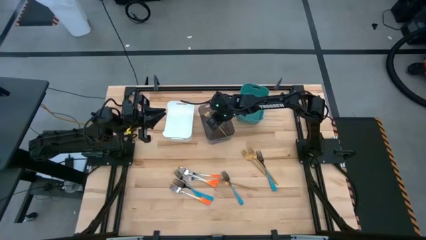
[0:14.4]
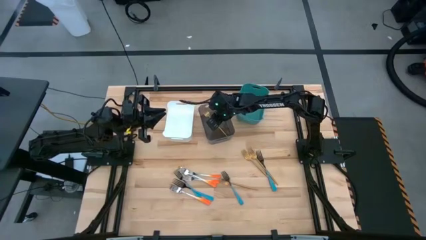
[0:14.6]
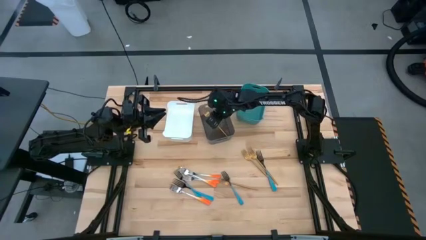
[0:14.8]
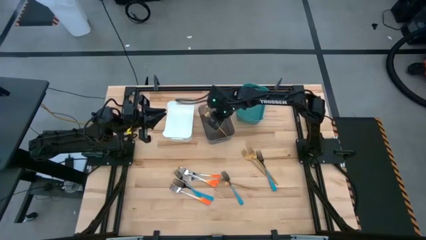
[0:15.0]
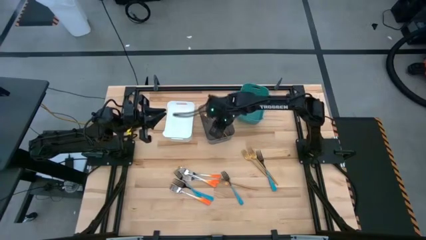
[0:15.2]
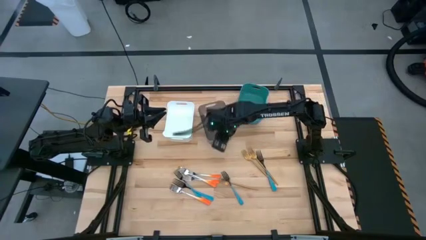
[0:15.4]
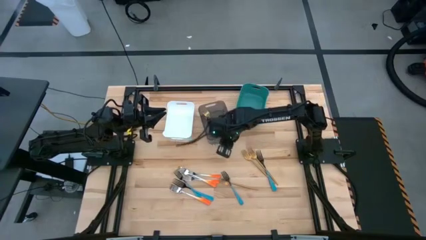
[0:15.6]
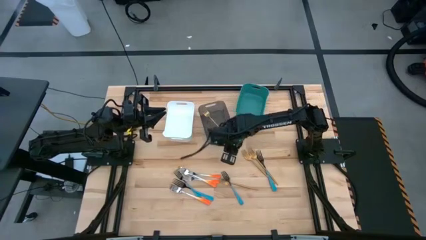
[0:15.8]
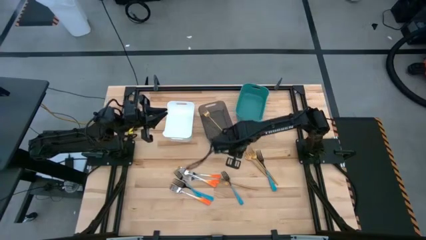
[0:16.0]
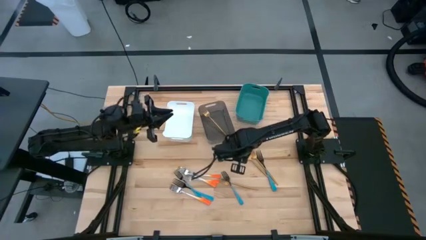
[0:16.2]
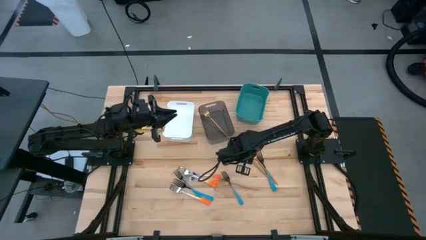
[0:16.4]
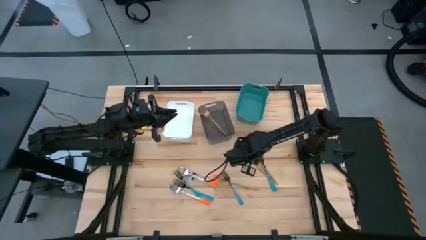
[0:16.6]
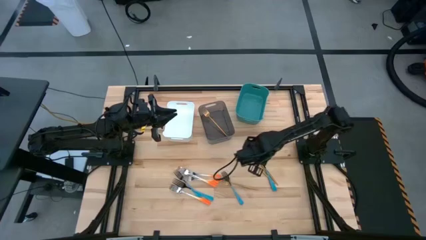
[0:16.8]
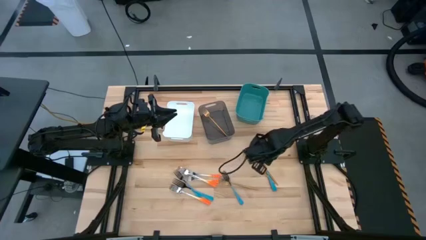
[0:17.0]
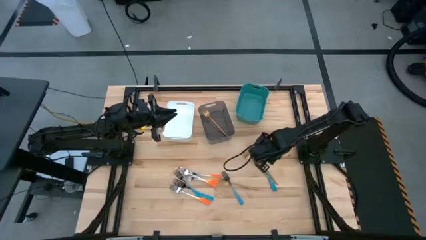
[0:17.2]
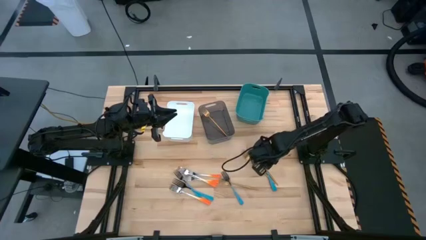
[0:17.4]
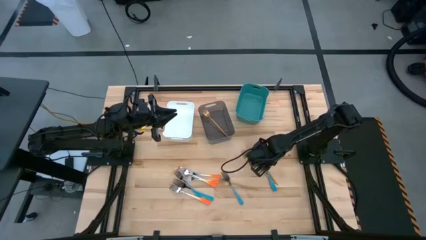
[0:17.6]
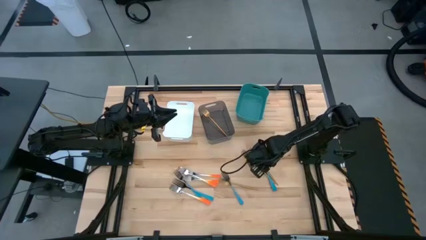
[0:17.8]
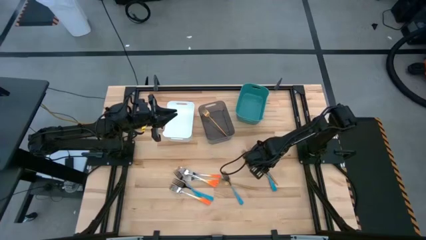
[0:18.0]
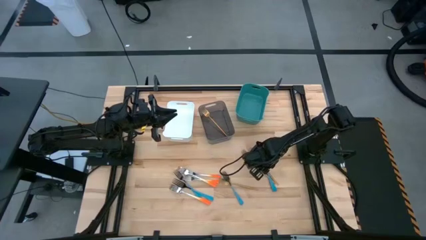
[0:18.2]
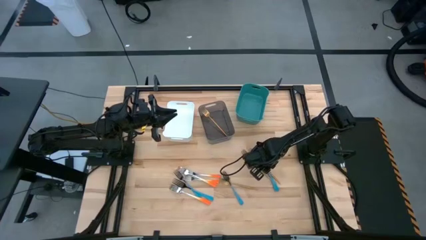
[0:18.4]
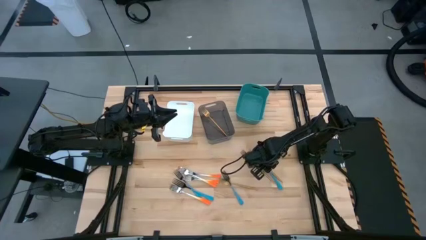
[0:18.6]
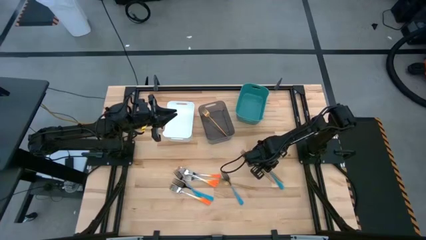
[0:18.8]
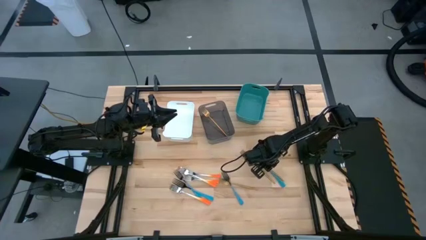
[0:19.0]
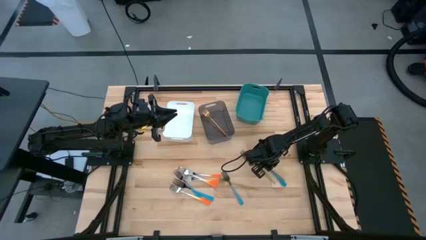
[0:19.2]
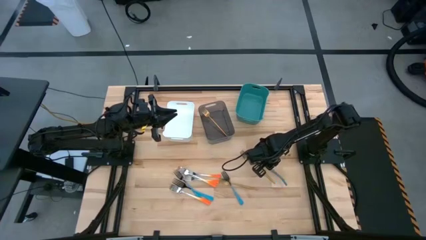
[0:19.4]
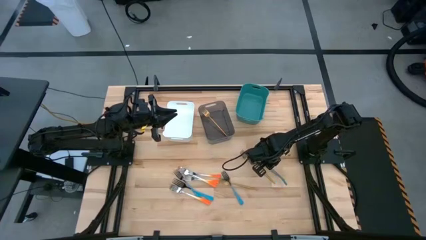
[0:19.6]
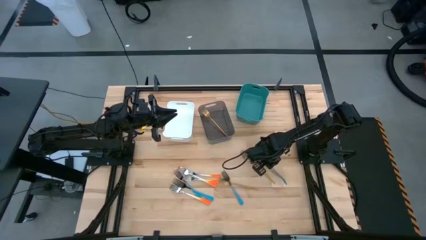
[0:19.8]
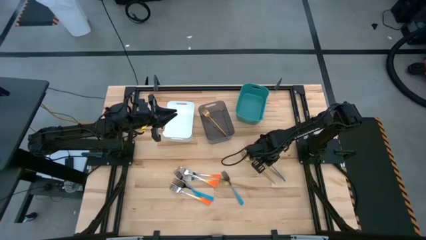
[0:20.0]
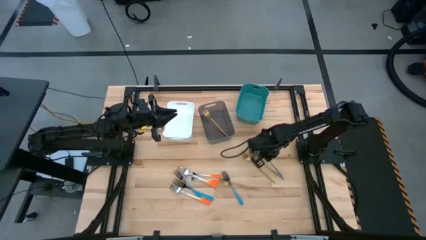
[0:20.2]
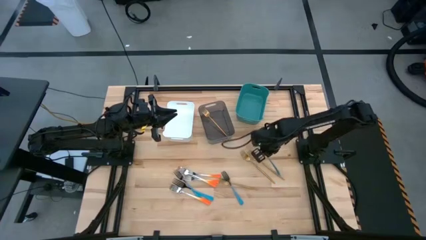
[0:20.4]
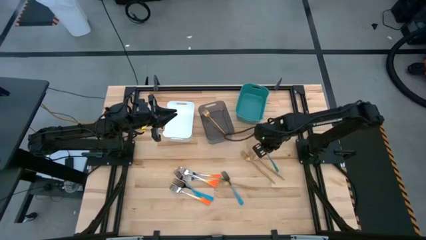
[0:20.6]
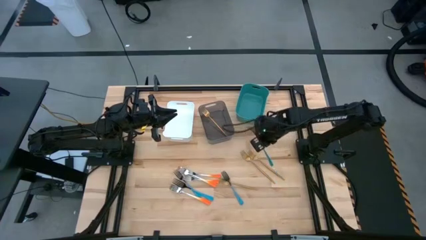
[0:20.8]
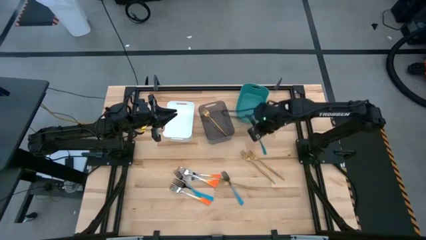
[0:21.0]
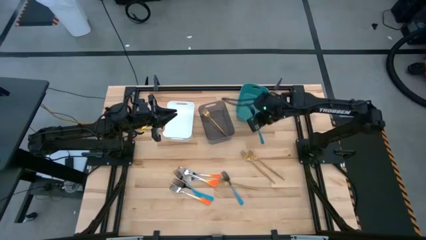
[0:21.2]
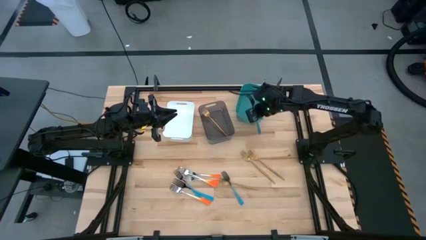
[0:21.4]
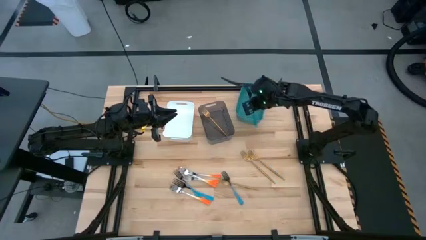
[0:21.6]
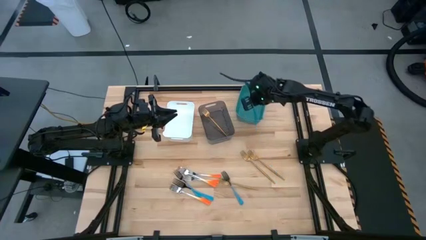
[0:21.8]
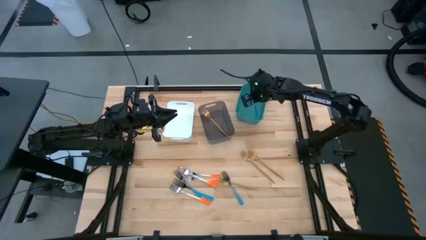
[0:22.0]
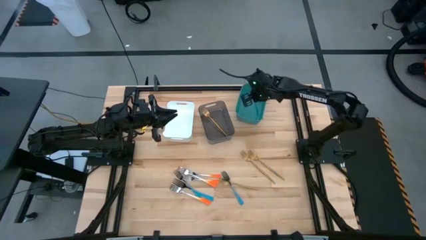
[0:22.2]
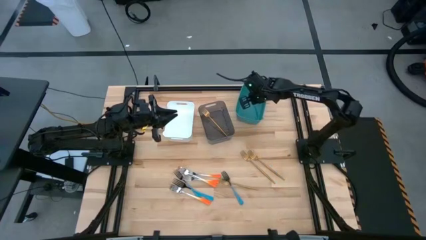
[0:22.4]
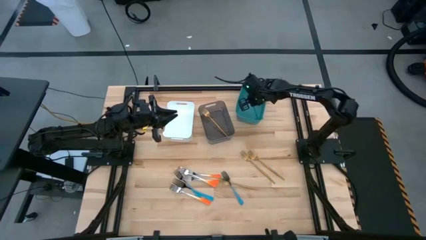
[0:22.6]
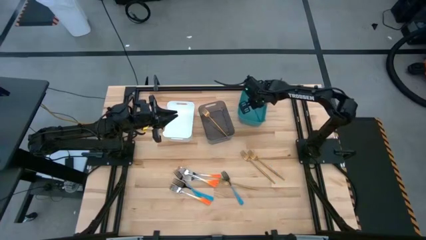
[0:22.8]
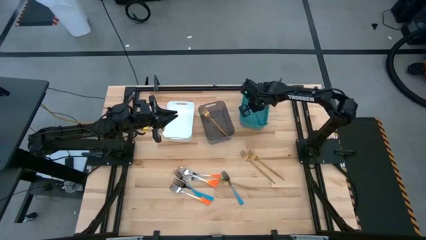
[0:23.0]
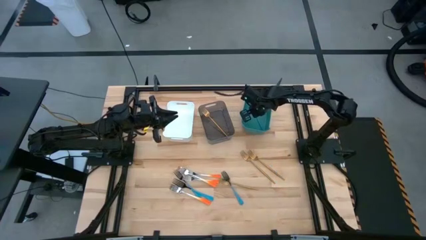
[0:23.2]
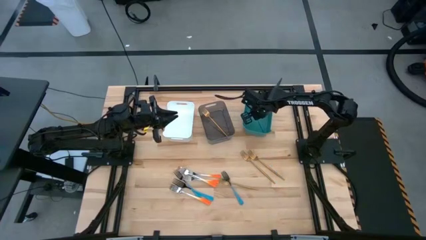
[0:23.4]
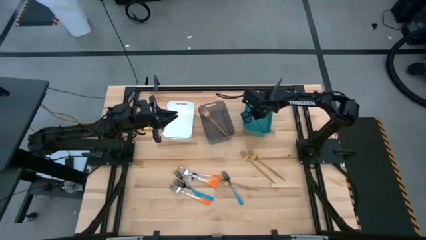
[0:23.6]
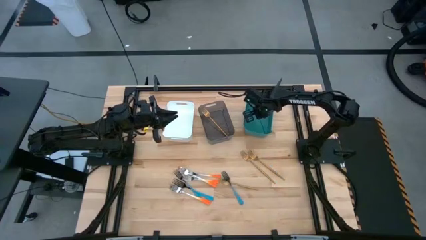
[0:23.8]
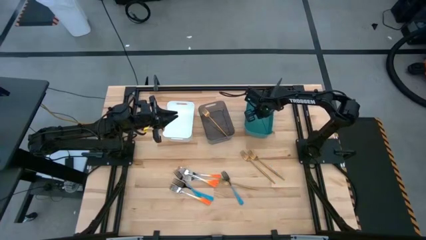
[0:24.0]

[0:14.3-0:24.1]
Task: Sort silverware by color (type)
Put the blue fork into the green bin

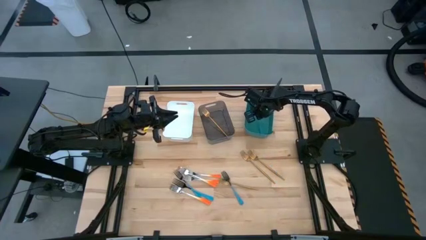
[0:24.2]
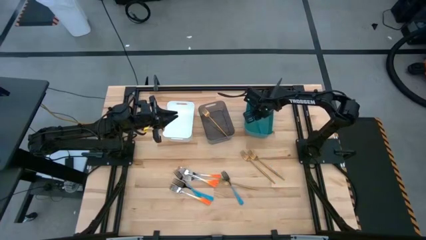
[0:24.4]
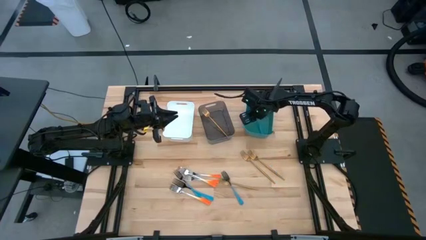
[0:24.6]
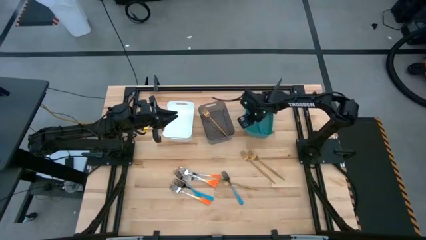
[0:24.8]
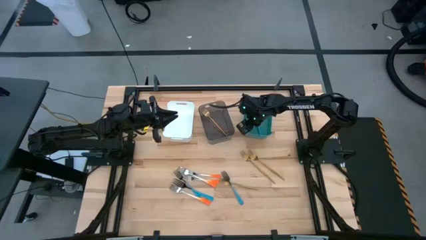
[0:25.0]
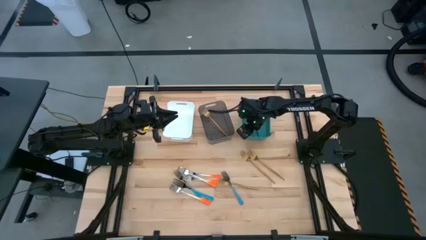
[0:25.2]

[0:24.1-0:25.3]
Adjust the green bin
